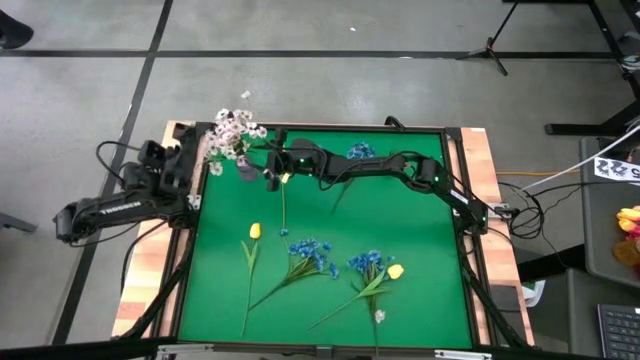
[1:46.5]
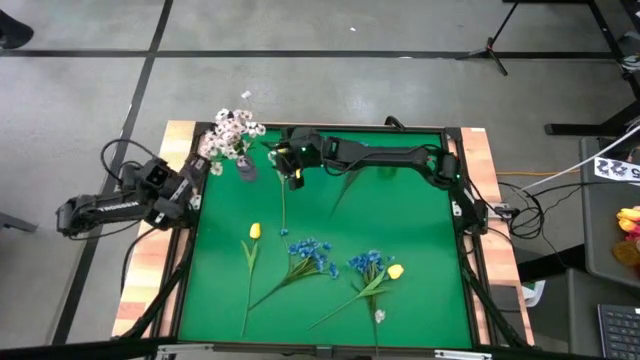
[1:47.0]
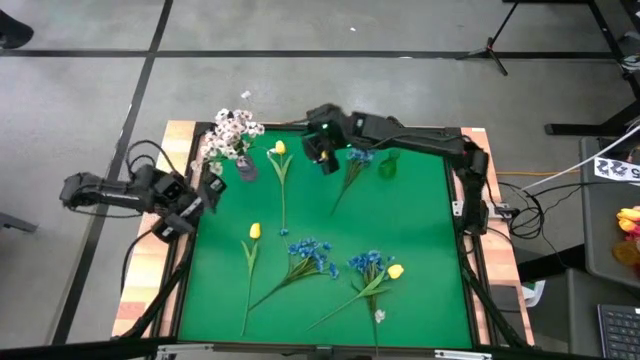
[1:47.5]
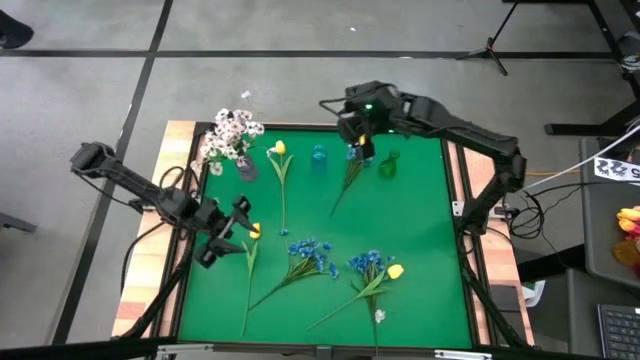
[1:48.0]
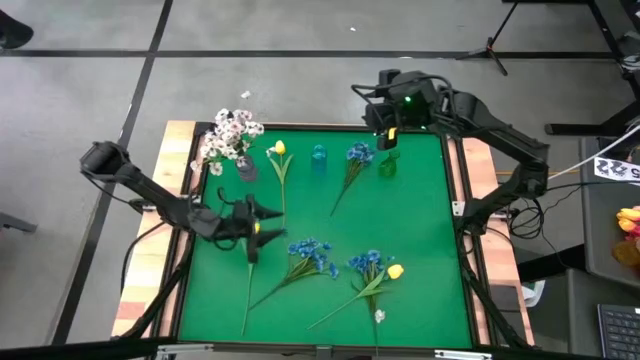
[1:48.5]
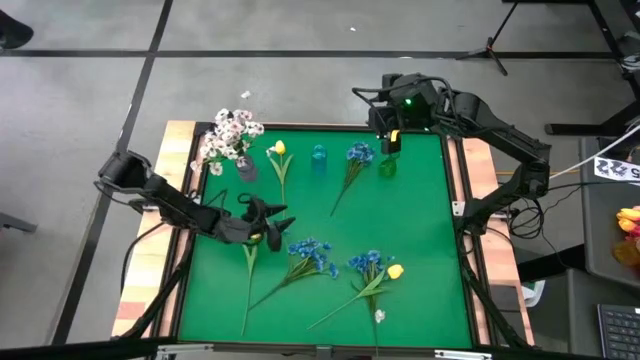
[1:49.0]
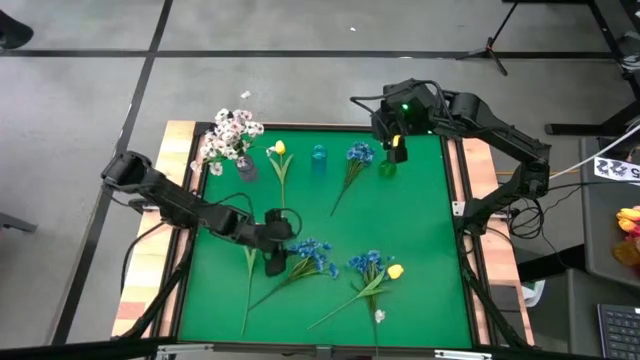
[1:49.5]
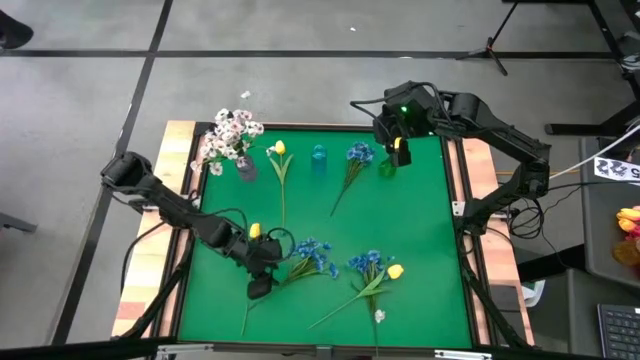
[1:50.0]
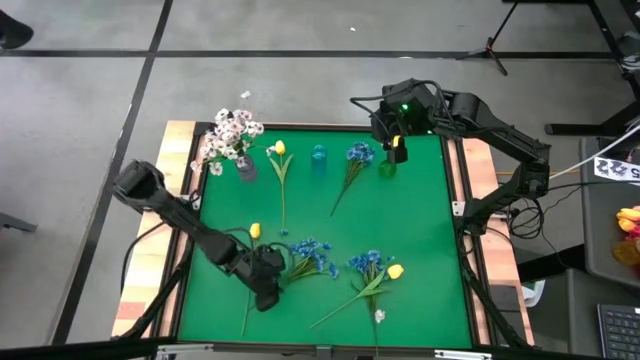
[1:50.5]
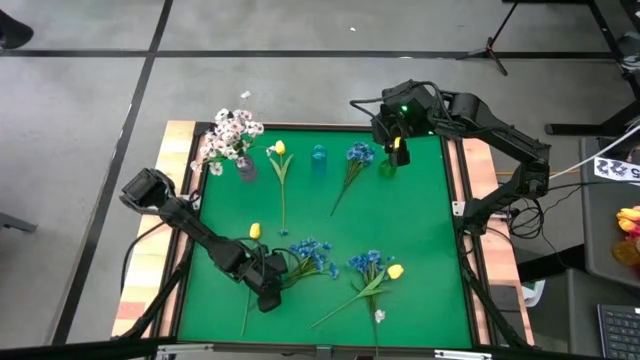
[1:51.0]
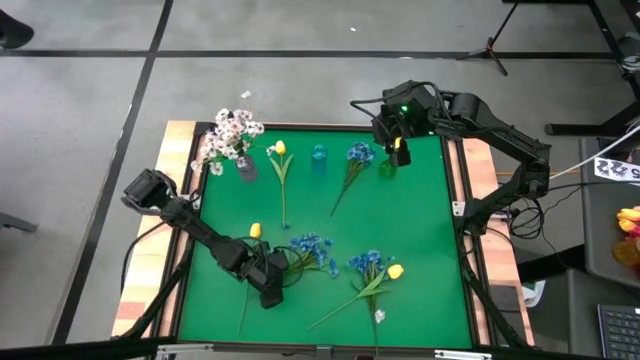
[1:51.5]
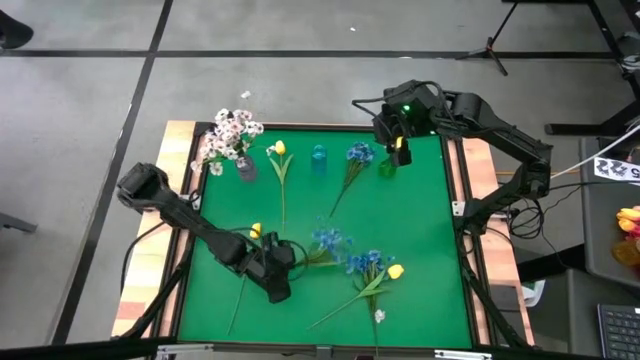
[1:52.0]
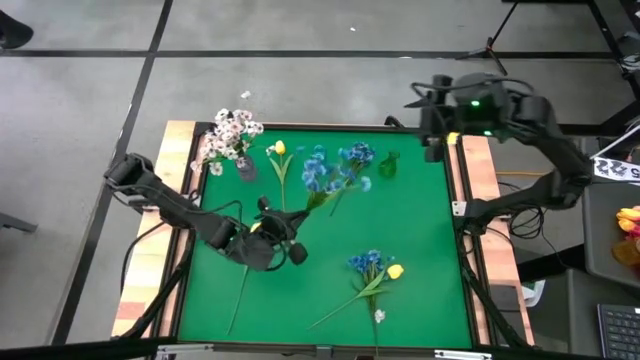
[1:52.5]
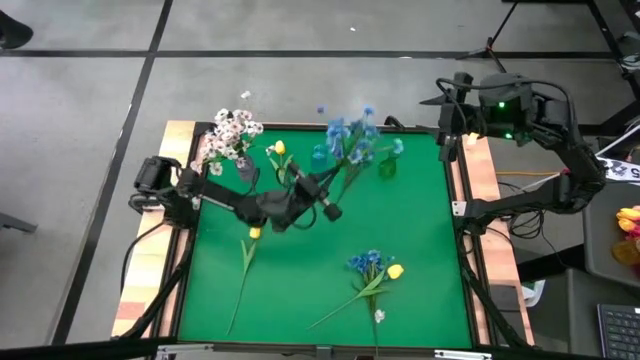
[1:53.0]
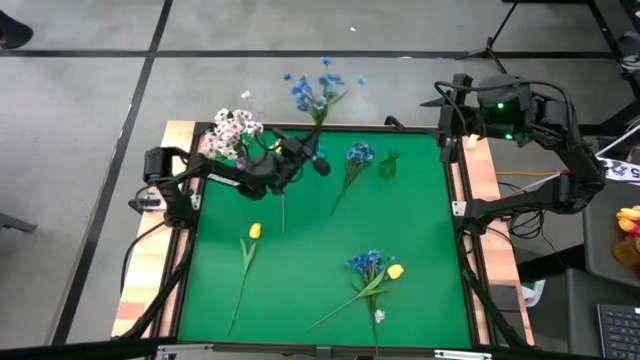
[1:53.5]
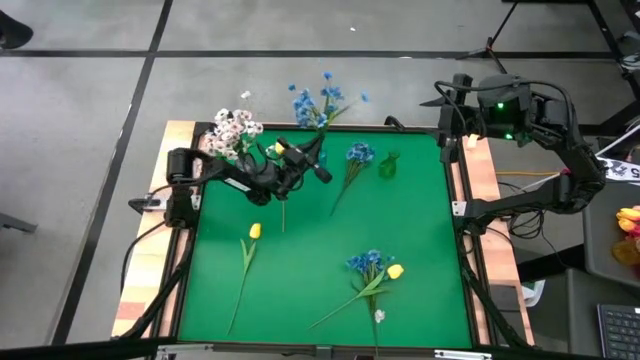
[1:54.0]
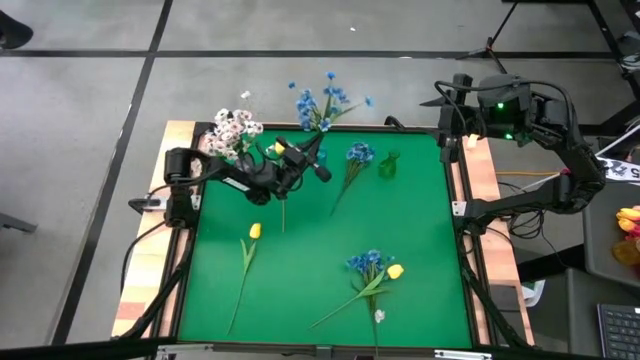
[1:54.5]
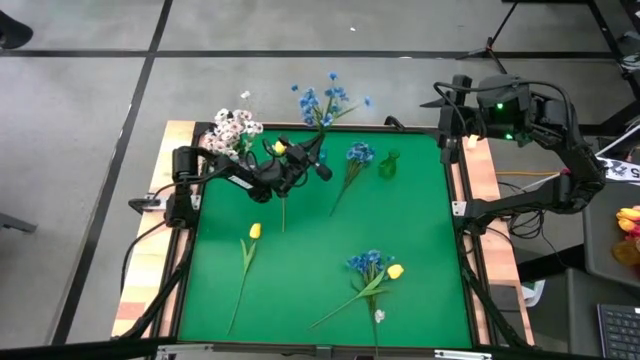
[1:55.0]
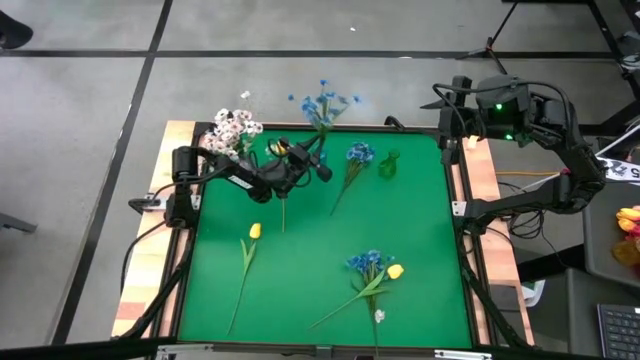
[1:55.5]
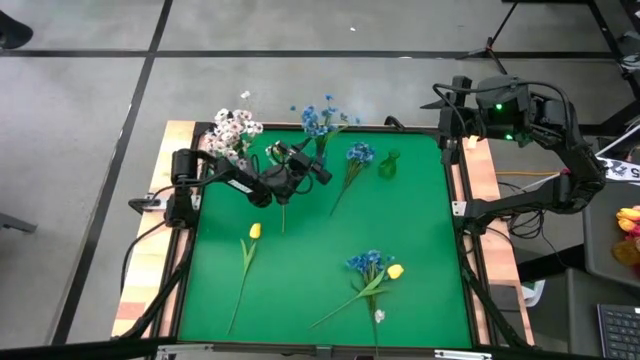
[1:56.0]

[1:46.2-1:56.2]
Task: Sort flowers into vase by color
Put the bottom left blue flowers into the blue vase

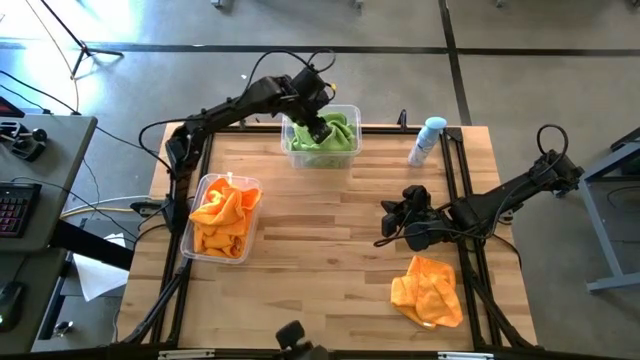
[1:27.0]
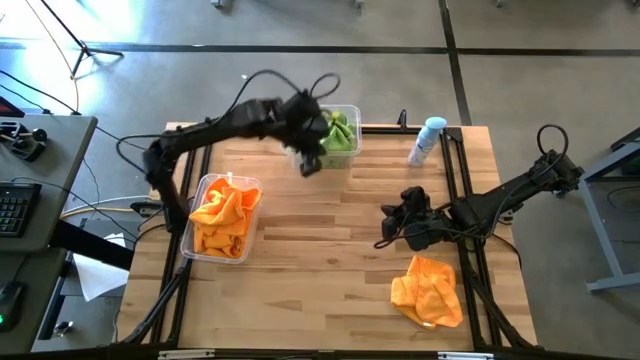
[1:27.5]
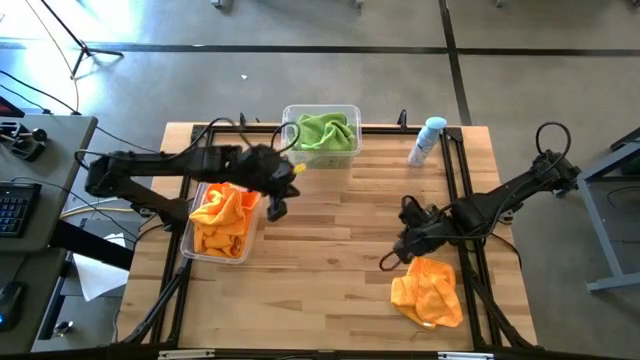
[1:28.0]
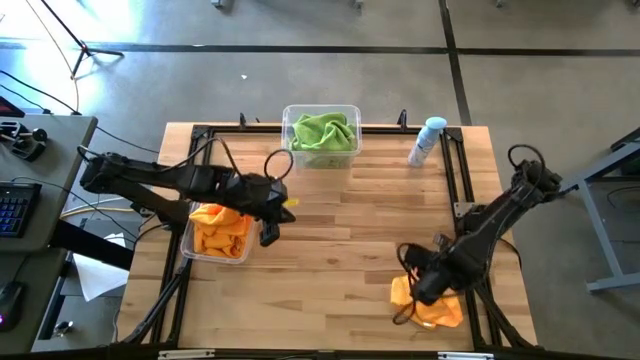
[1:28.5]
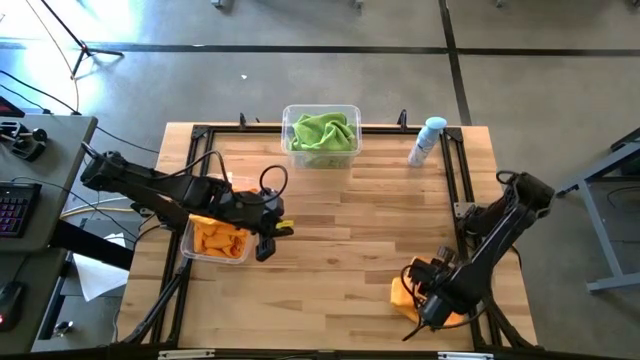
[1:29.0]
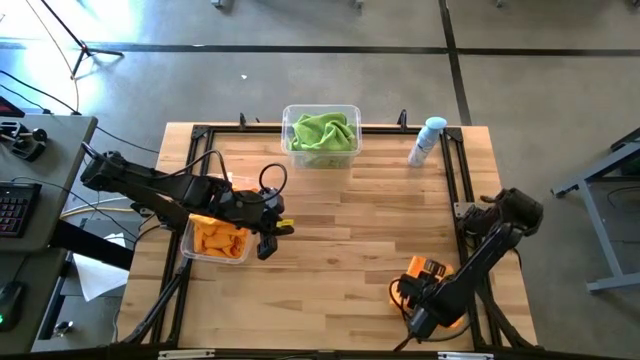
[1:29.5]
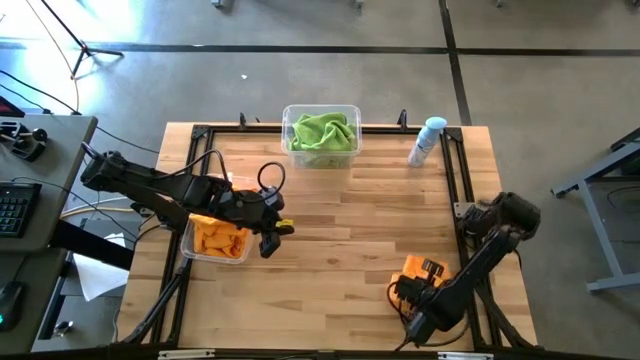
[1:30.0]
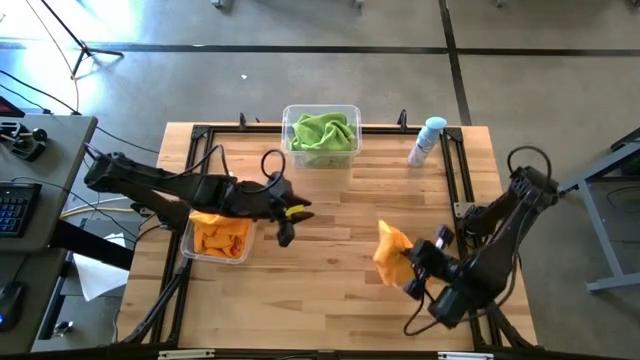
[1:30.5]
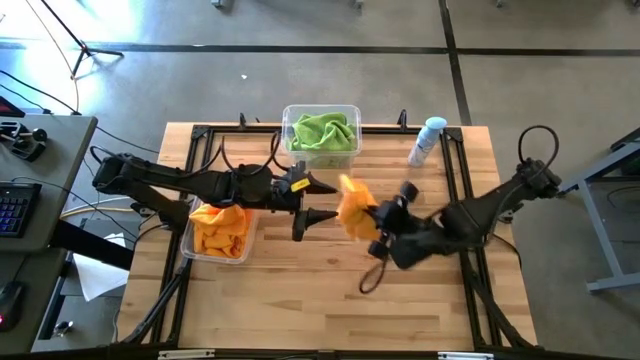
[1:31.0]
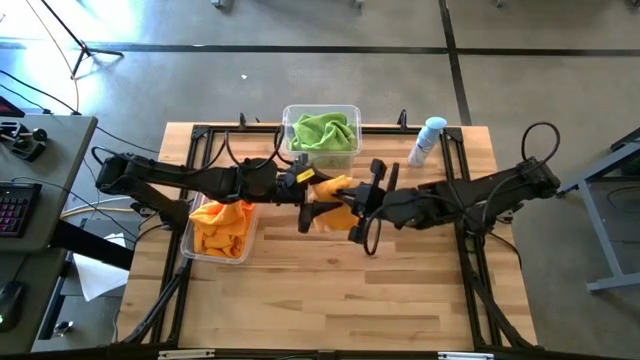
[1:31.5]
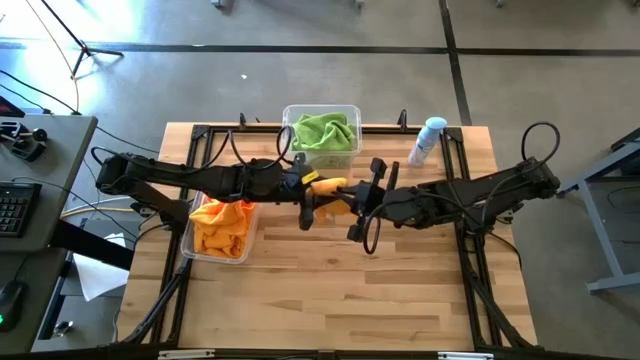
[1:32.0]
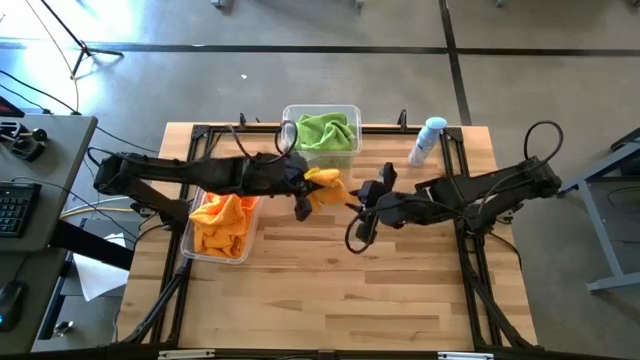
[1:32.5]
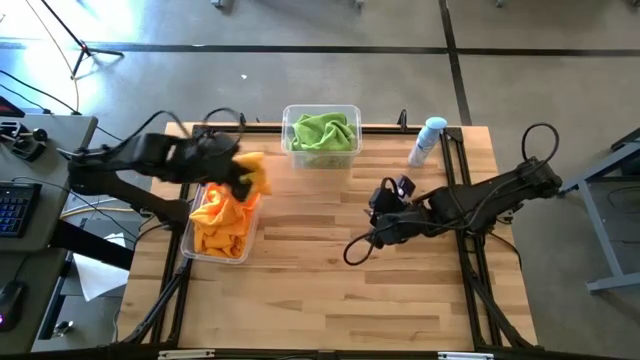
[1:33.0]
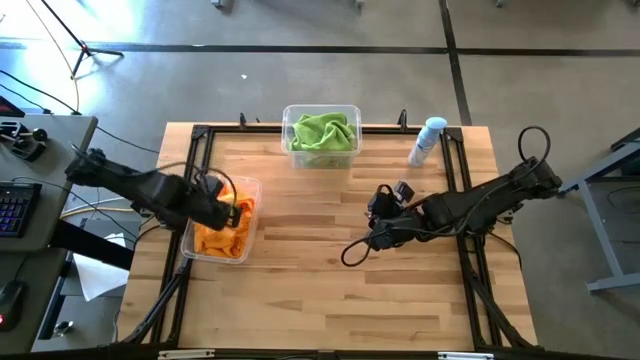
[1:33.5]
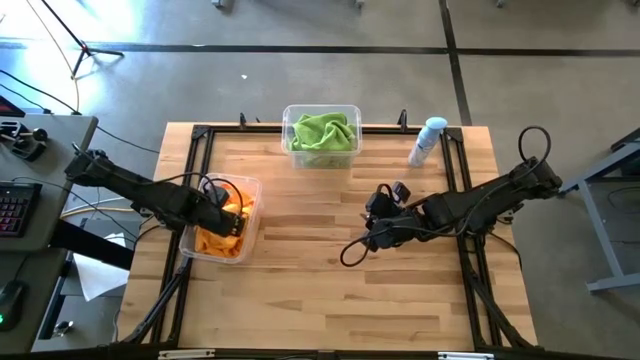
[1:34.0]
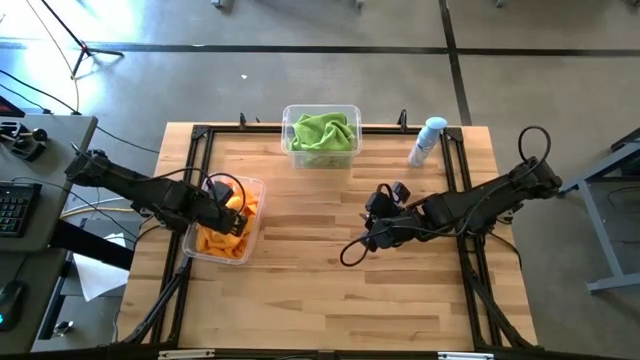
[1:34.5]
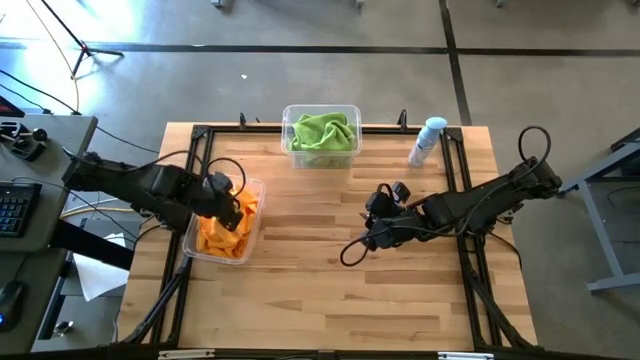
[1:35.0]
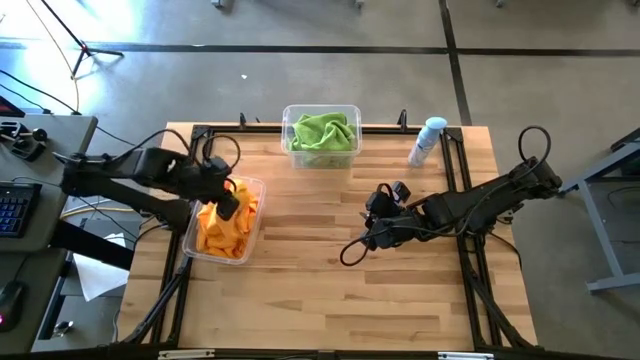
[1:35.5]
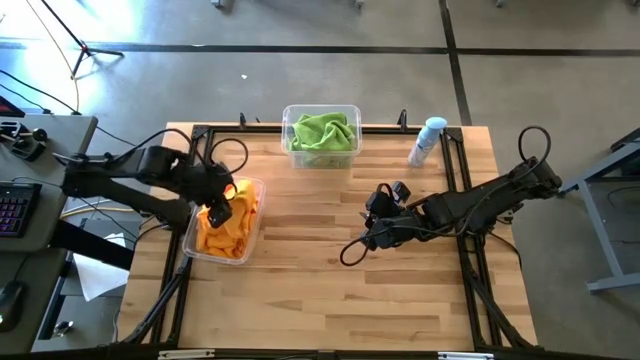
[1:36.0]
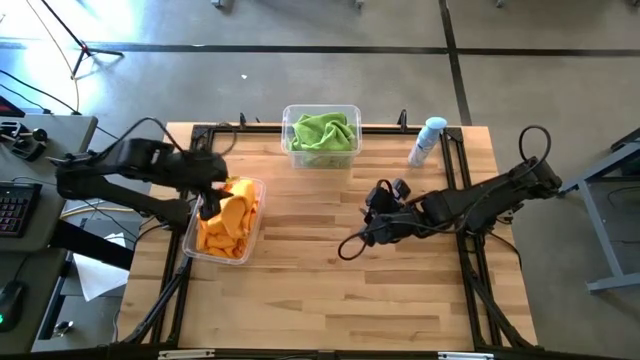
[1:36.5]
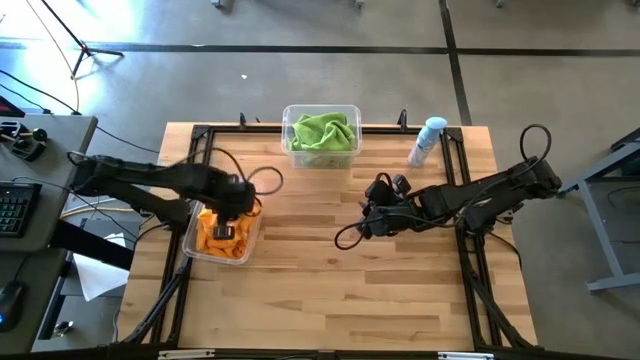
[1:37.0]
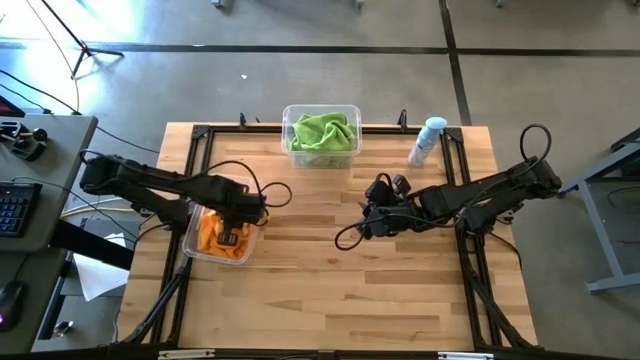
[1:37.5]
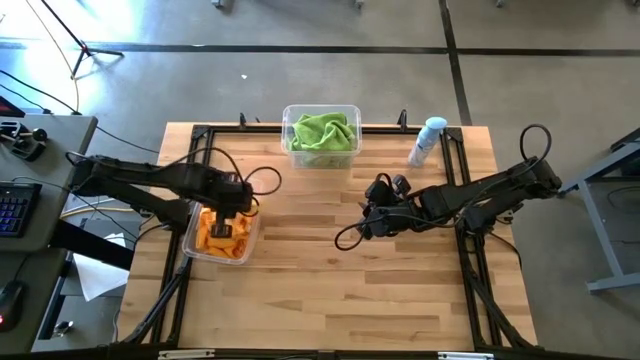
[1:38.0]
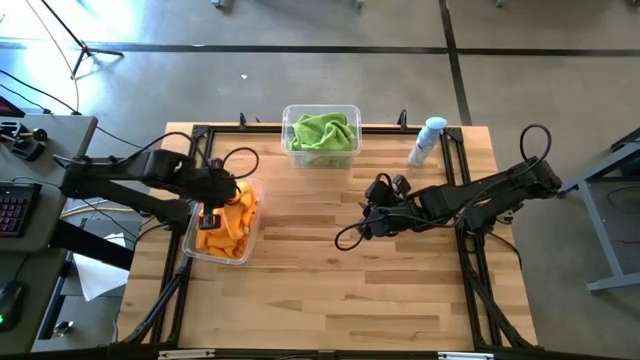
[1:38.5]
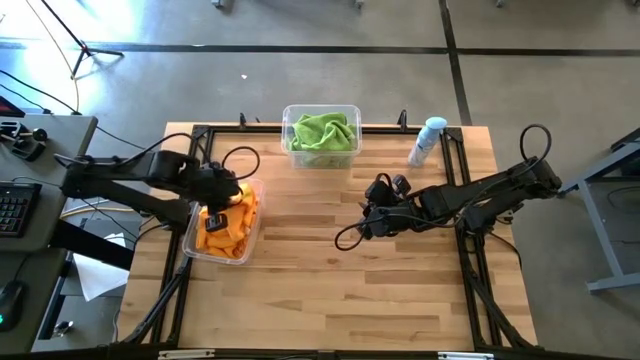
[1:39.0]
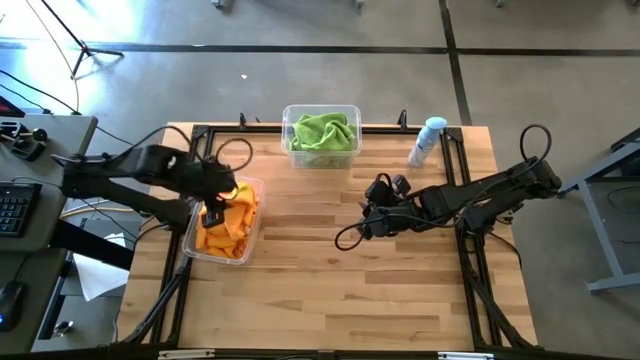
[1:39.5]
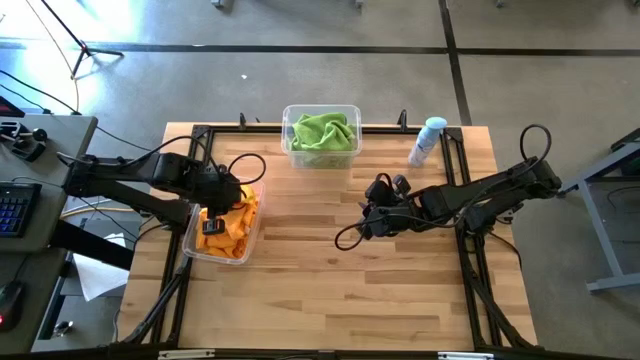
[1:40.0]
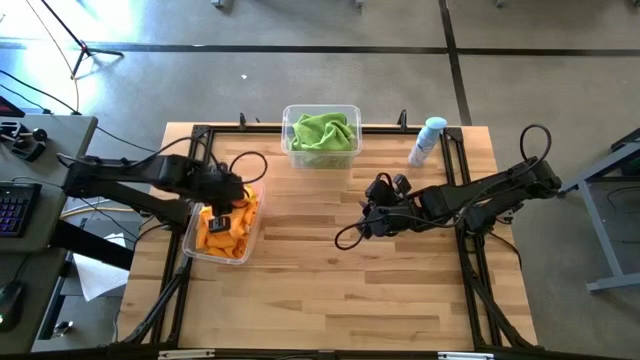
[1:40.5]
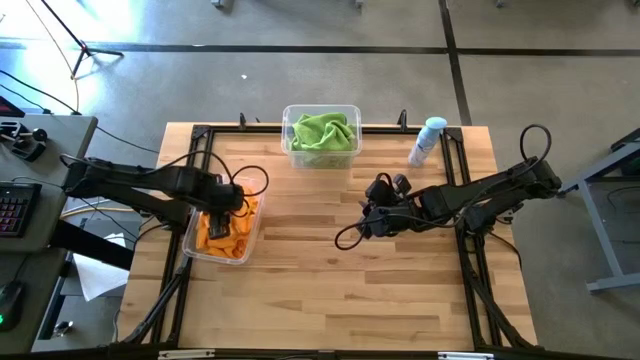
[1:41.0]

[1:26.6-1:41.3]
Task: Sort microfiber towel by color & place in baskets
Put the orange microfiber towel into the bottom transparent bin
